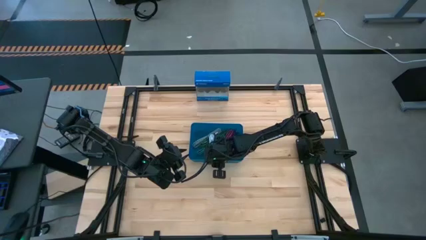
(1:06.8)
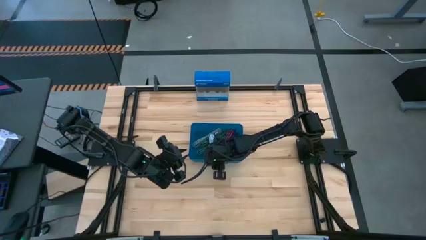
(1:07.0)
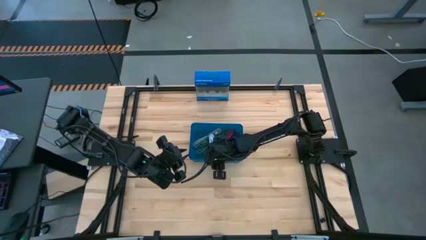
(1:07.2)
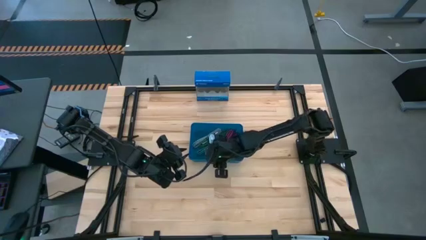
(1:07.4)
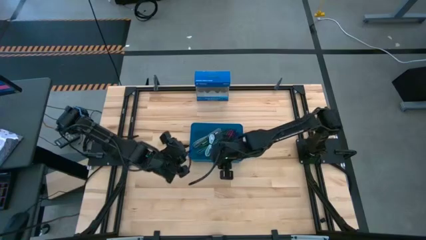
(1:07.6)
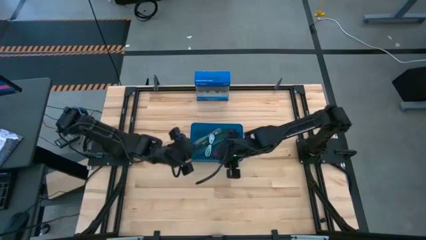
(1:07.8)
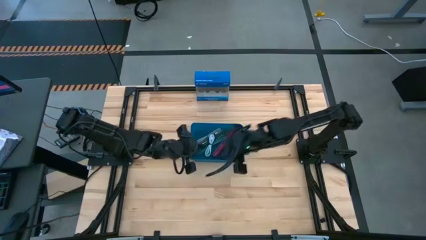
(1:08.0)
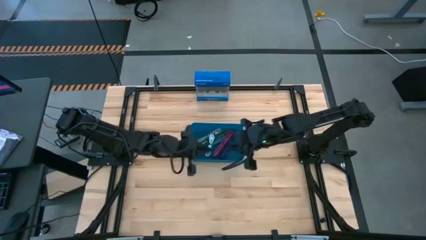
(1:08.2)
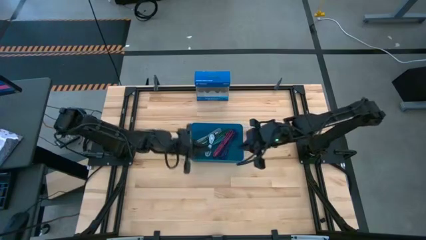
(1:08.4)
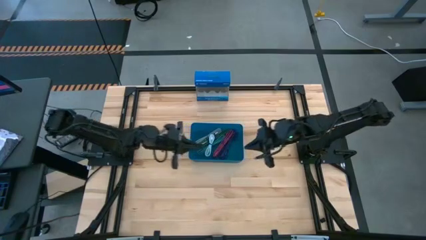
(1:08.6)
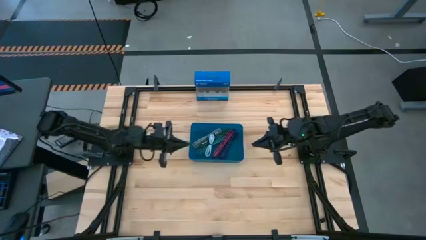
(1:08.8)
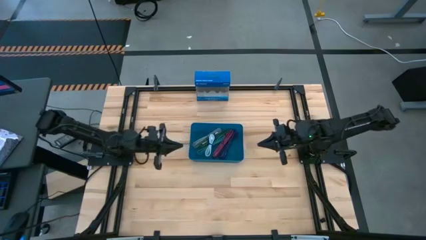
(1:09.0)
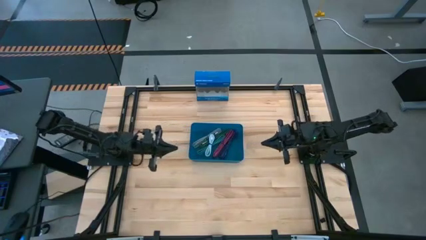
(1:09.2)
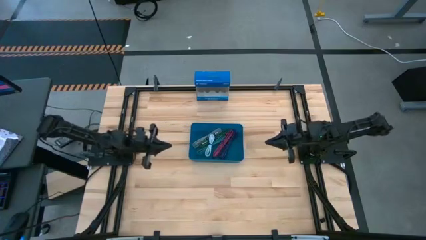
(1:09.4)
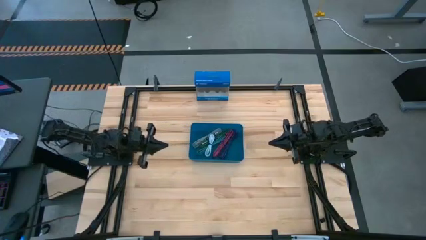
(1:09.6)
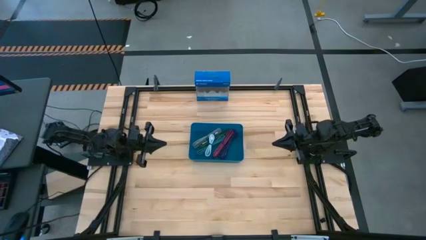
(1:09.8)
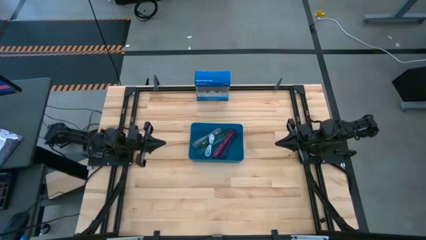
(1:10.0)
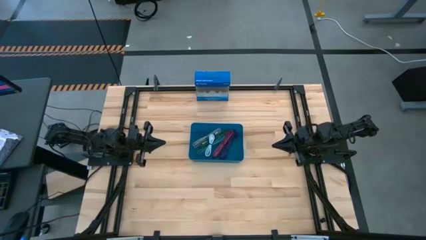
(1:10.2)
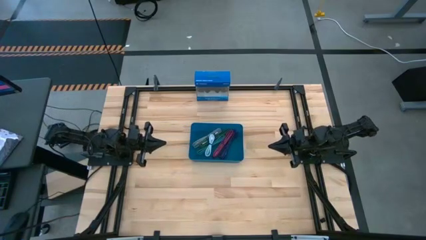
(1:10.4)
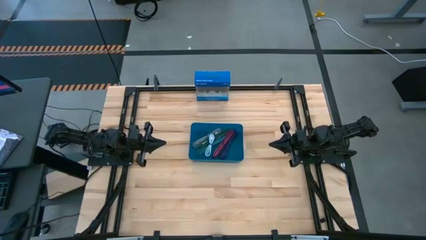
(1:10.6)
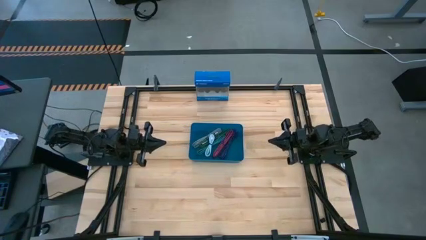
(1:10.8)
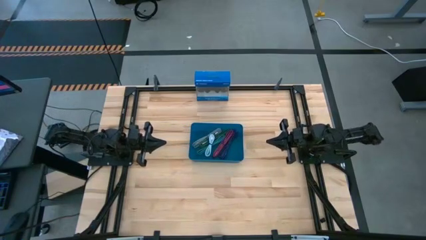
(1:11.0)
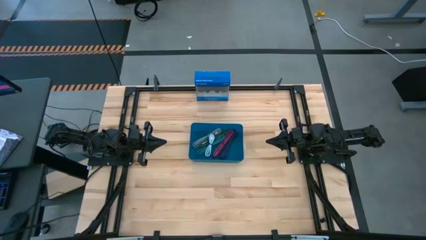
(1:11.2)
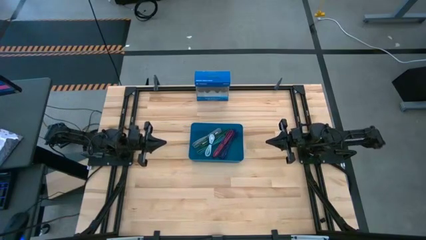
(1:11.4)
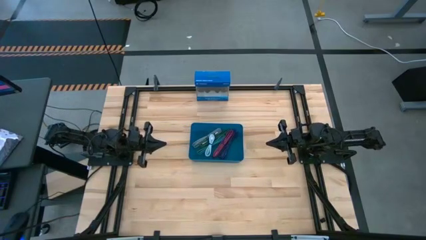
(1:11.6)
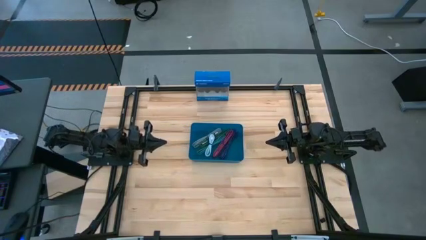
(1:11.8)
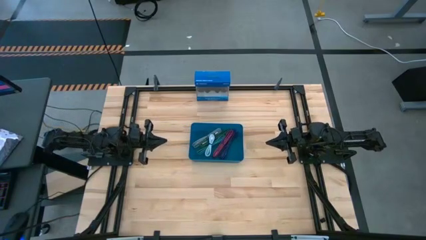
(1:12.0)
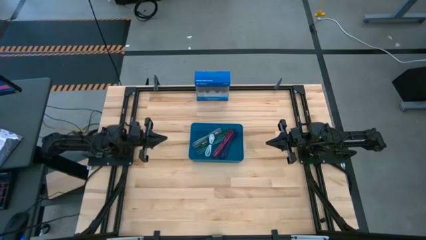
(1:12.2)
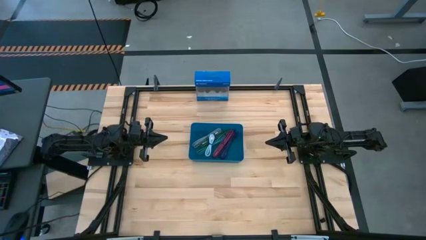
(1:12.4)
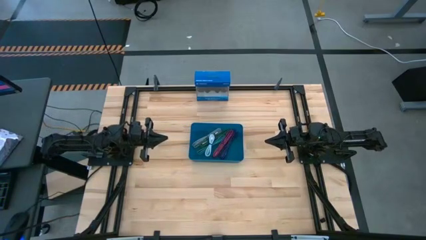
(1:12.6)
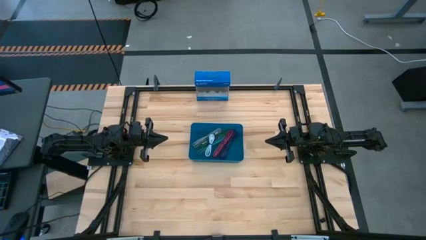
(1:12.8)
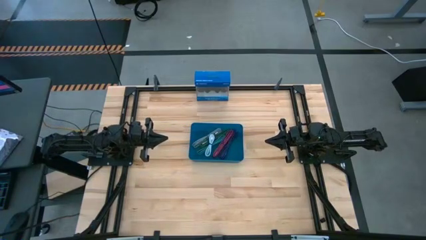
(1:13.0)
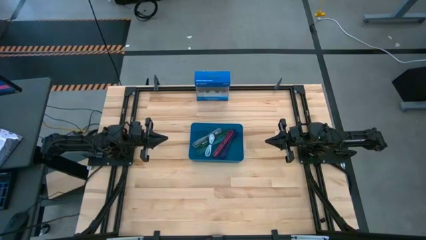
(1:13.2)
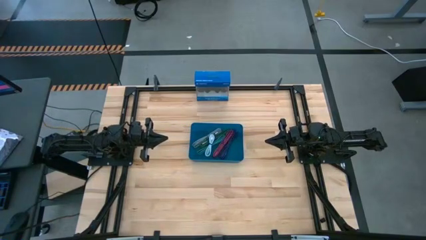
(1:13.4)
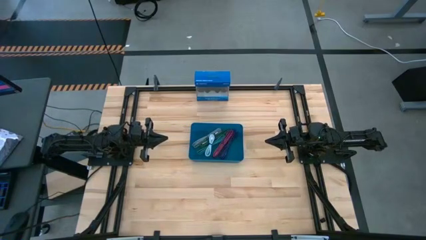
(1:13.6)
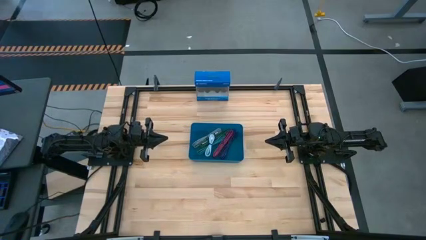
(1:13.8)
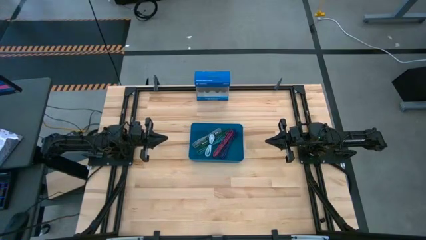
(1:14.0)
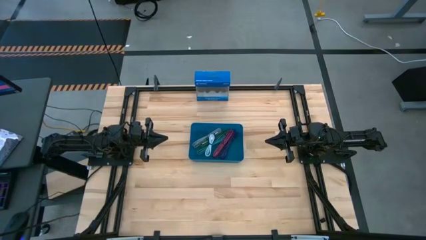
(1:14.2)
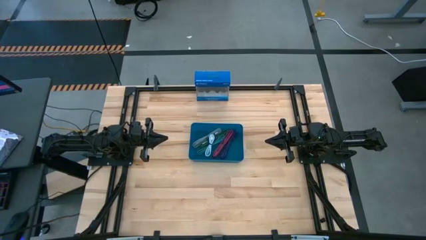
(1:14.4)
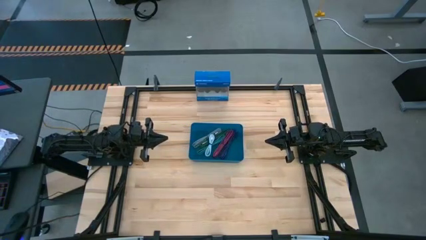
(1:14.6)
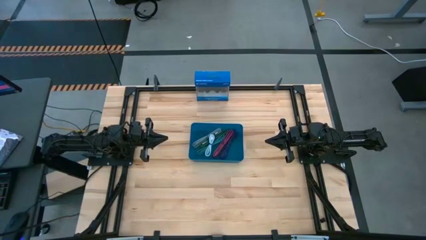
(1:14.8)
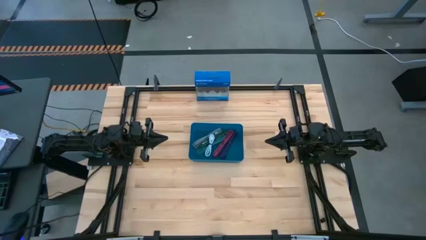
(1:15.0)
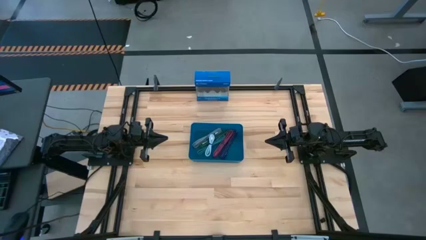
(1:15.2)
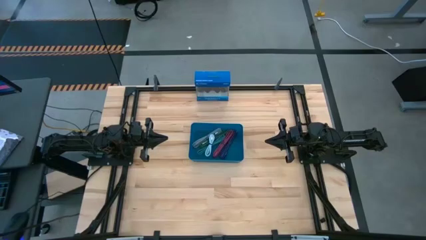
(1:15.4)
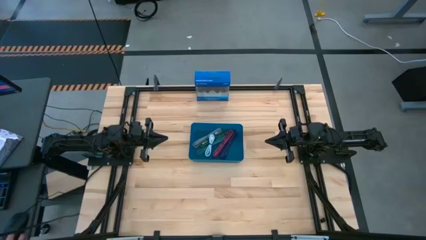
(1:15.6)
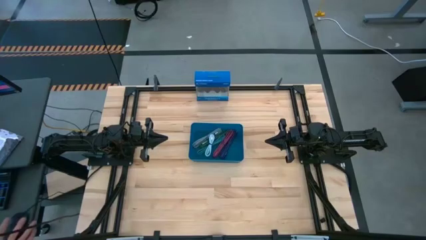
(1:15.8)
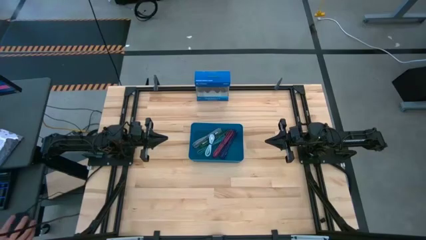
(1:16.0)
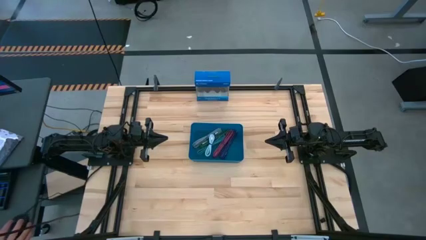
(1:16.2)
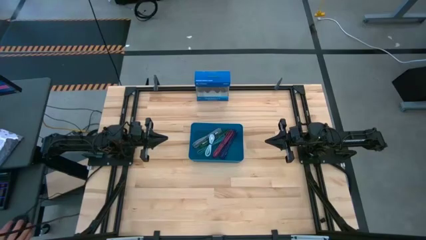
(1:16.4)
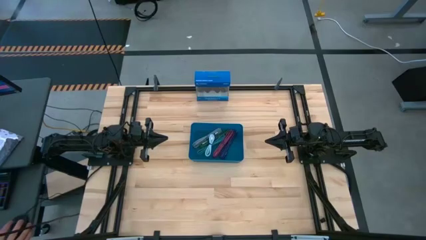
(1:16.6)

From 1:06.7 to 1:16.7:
Task: Pick and place USB-C Cables
Return to Home Position

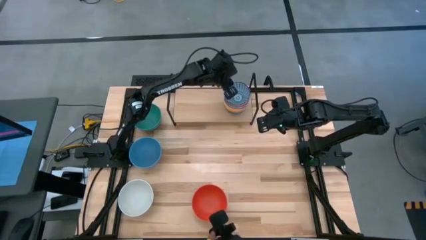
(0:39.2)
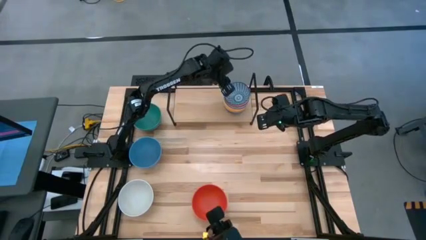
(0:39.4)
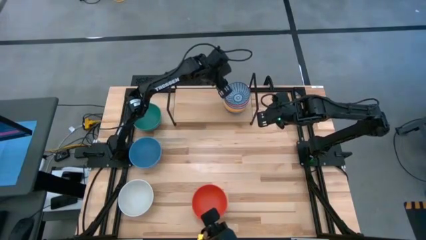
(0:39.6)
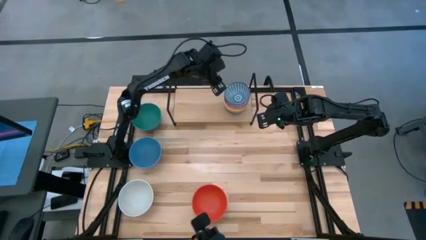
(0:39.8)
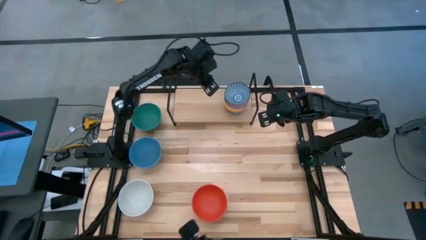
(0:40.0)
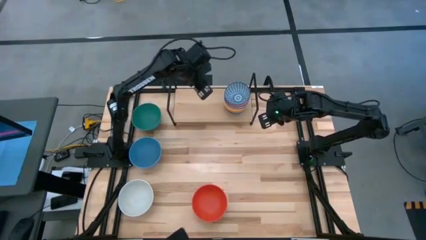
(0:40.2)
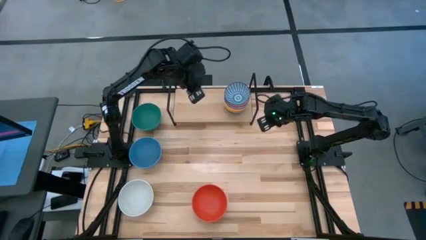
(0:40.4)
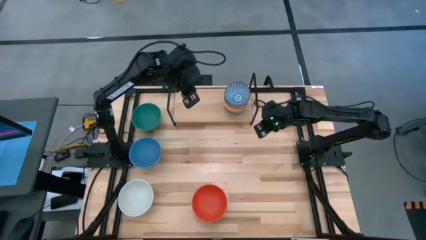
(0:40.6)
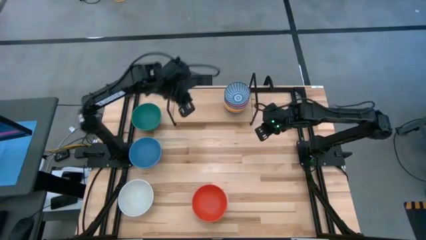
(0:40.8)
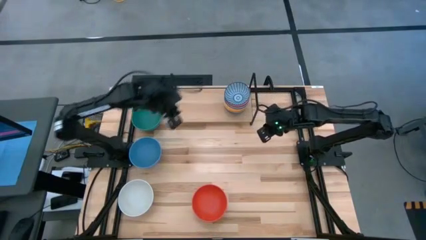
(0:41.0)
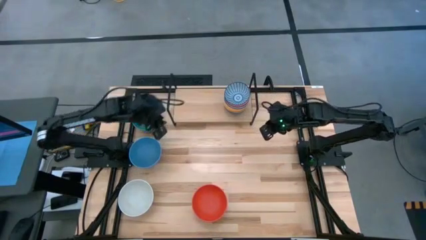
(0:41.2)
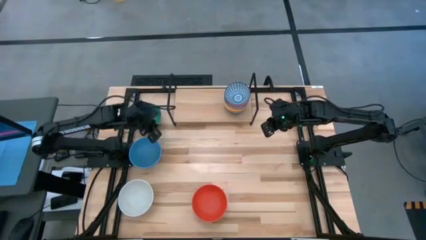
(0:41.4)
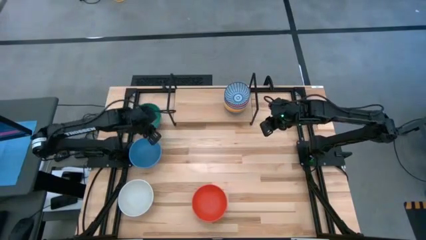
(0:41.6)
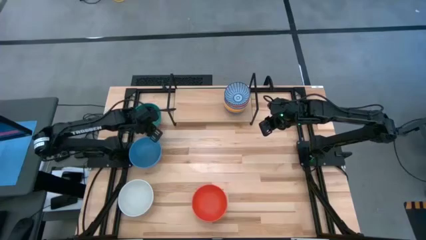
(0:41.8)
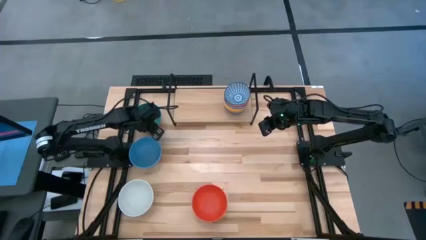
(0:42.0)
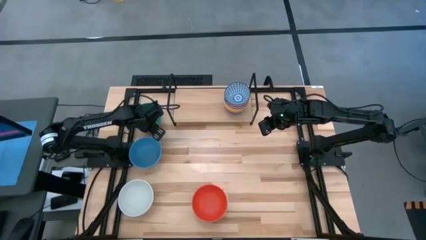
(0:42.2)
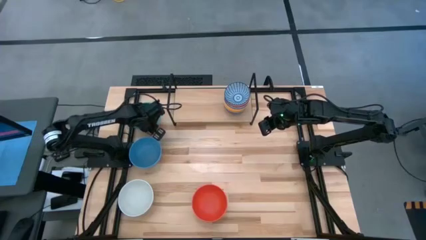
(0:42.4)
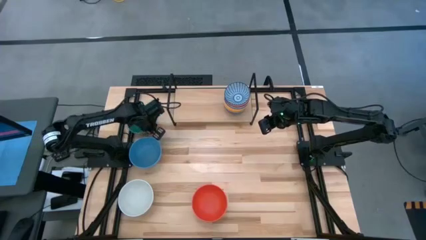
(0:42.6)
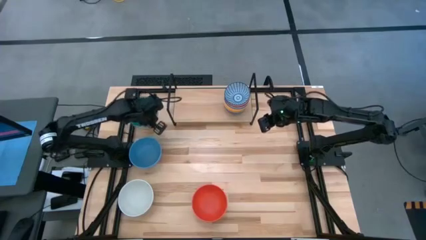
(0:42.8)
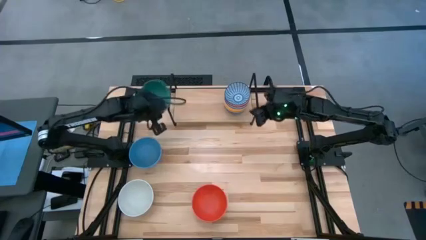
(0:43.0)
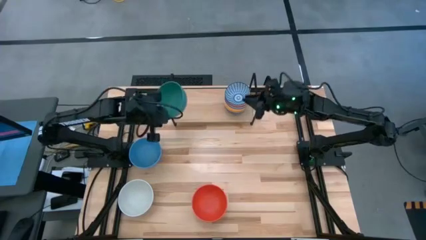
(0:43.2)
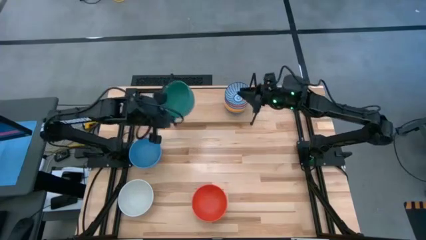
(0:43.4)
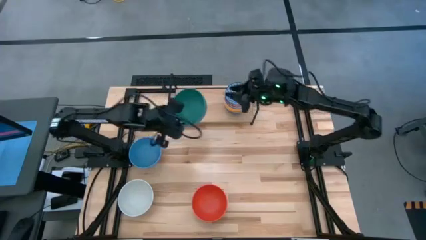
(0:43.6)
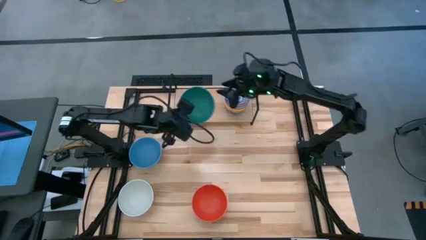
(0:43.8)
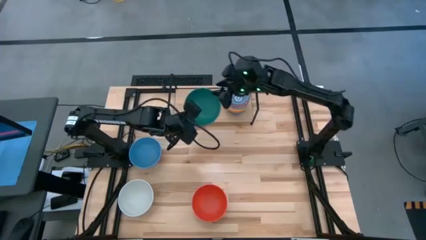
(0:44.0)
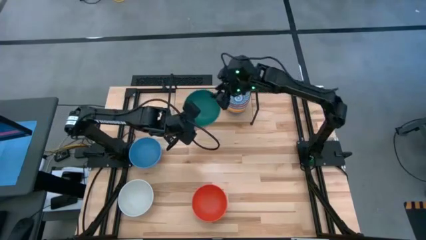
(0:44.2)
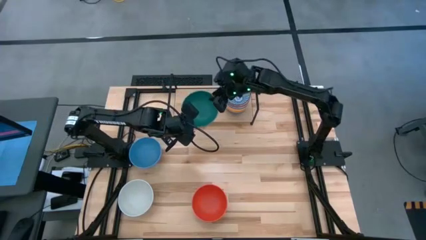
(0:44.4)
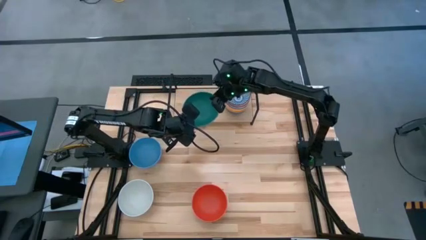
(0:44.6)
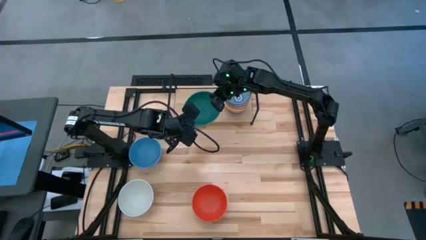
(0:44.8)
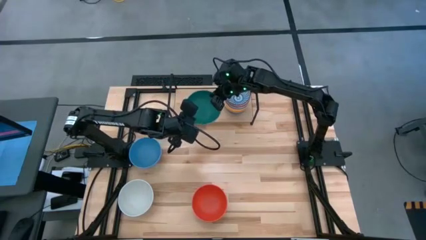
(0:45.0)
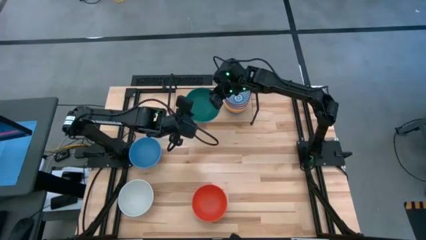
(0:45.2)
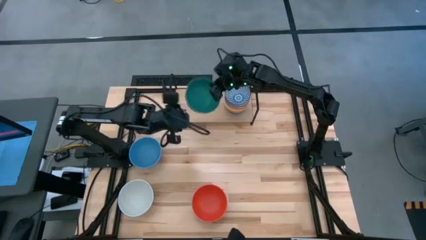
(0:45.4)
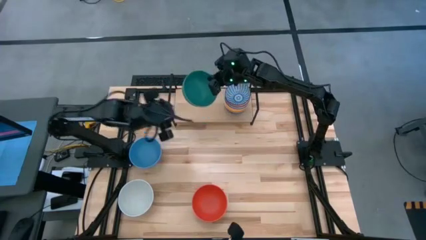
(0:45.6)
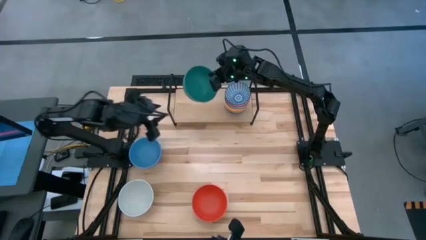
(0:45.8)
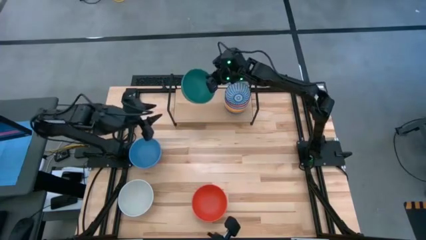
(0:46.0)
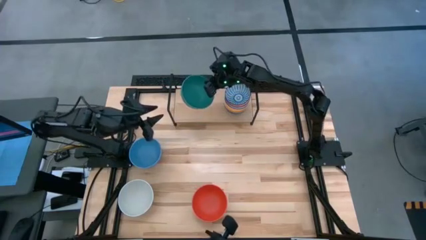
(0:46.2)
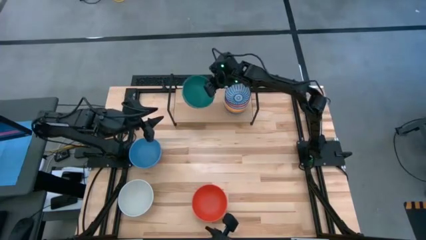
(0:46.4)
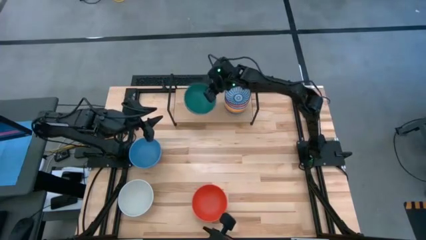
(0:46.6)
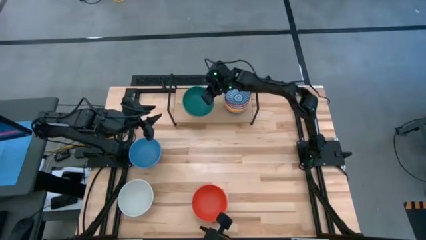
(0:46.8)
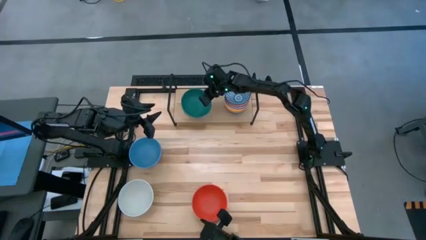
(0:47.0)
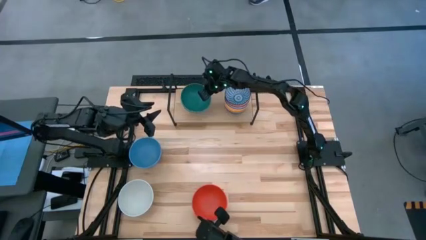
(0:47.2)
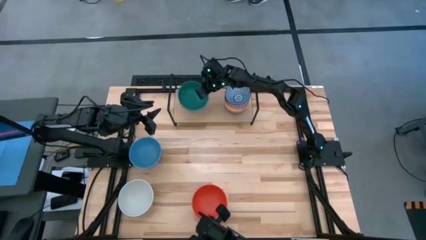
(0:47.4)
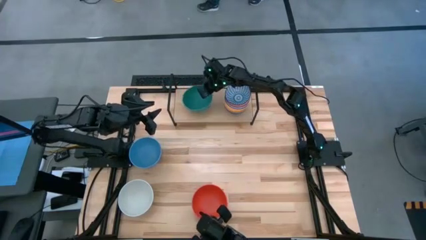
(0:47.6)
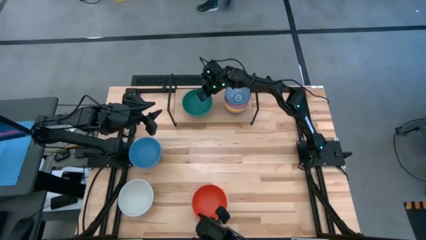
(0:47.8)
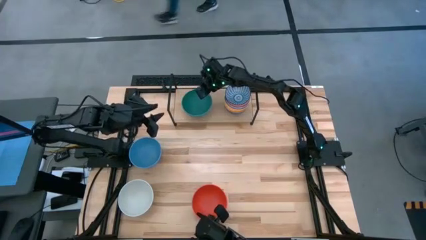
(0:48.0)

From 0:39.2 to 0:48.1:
Task: Place and stack bowls onto a shelf
Put the green bowl on the shelf
